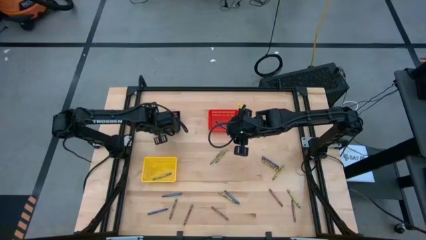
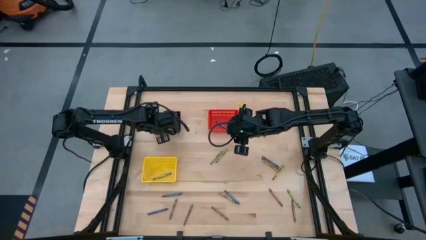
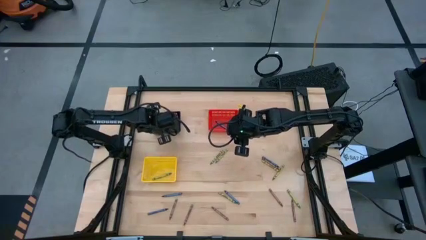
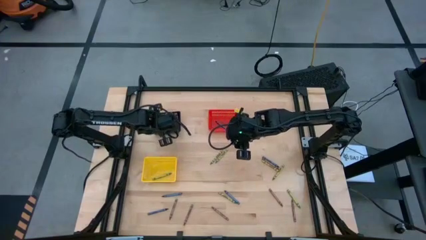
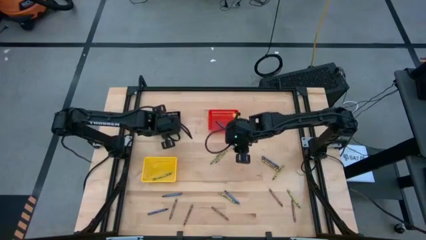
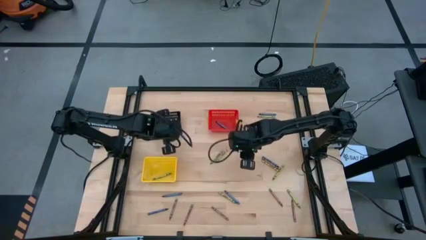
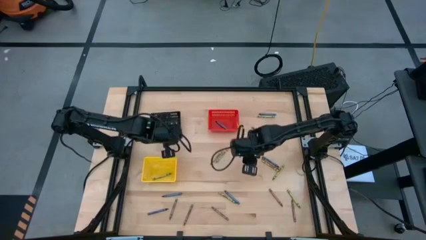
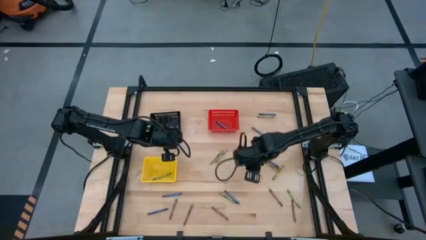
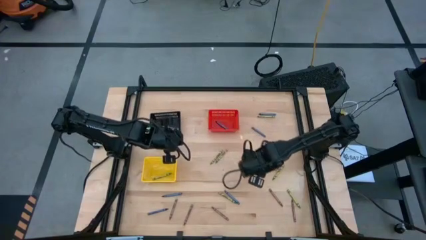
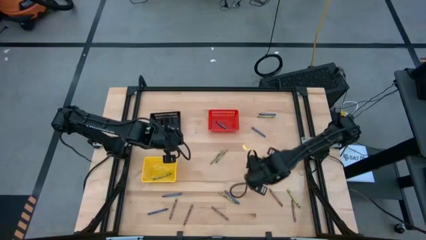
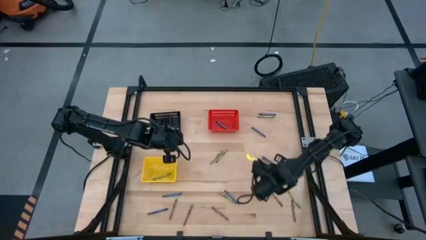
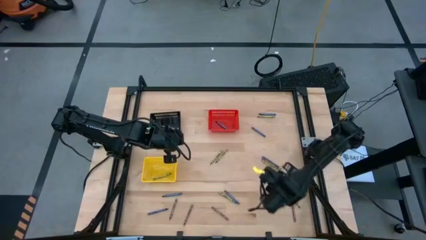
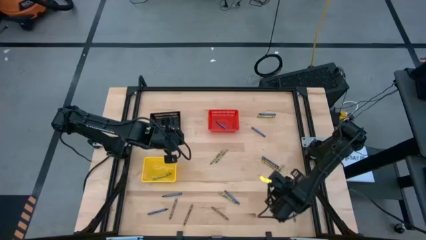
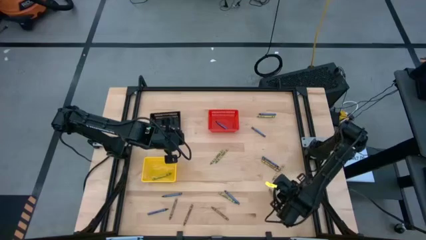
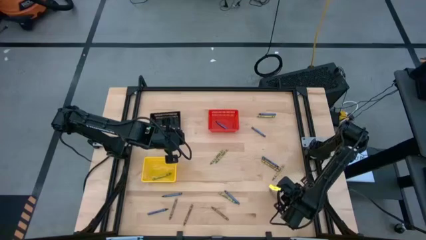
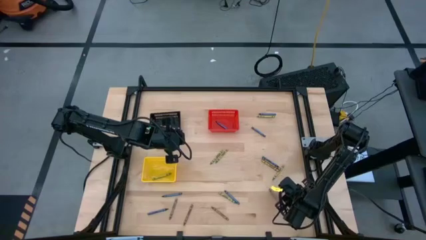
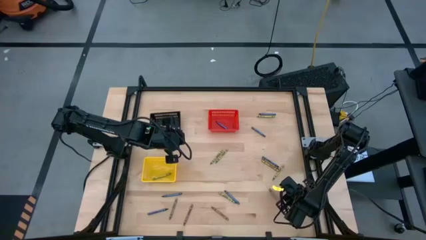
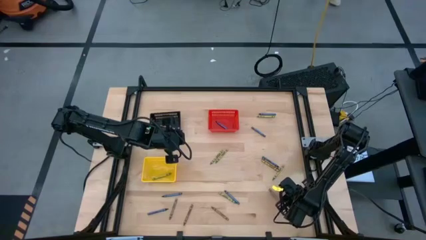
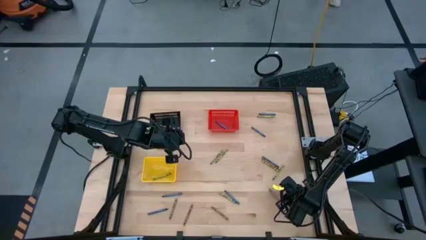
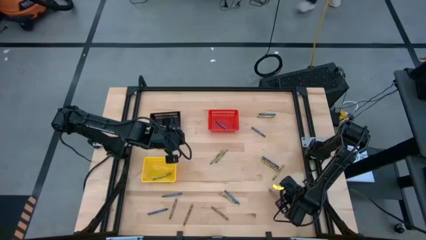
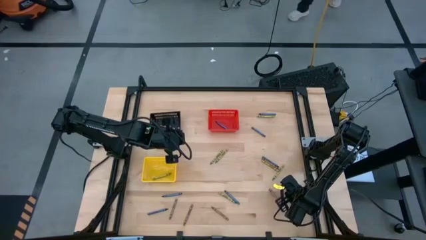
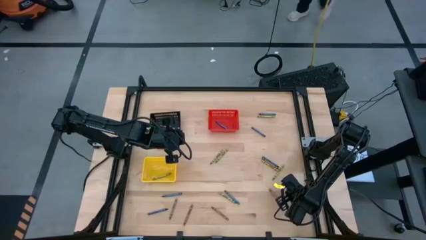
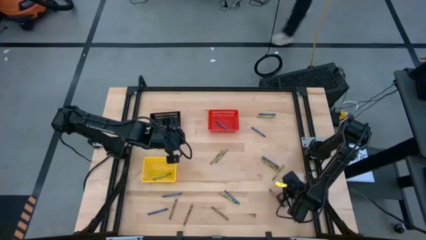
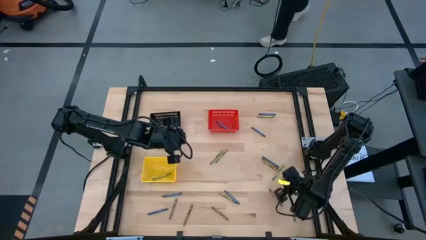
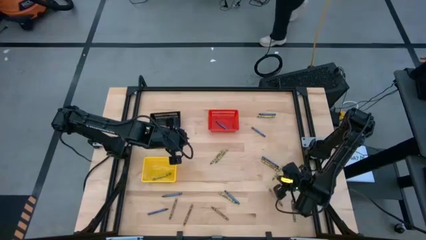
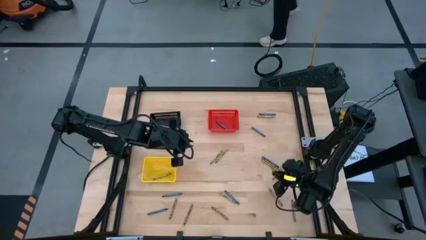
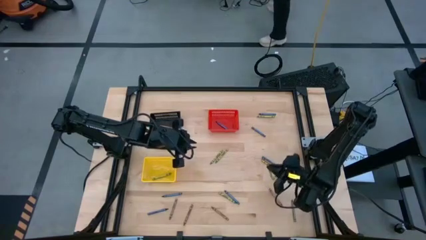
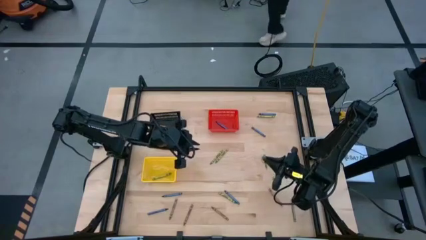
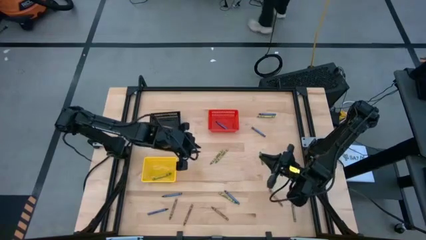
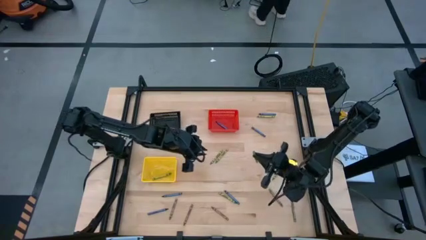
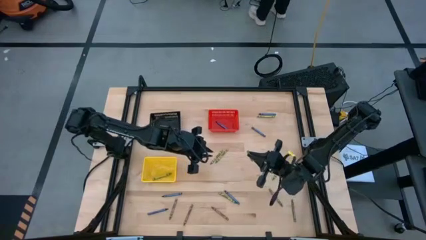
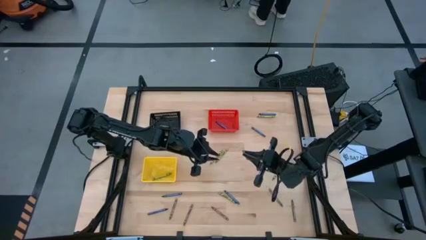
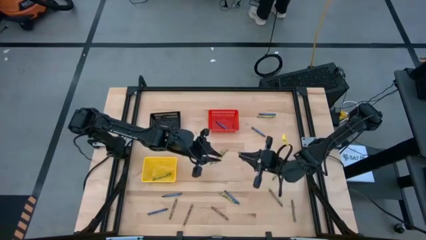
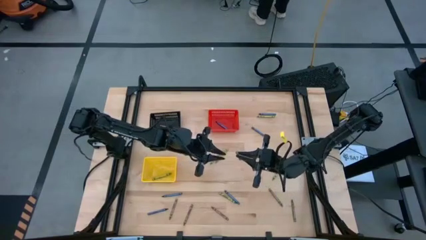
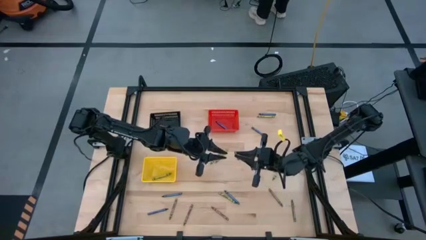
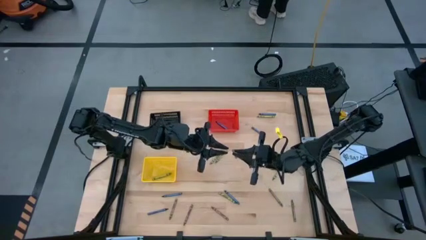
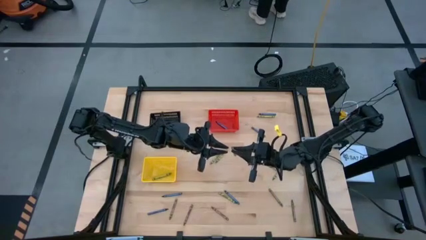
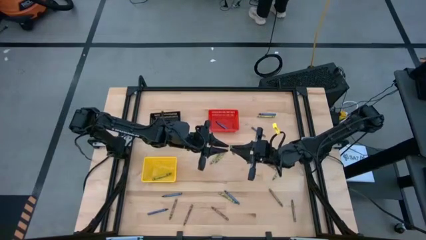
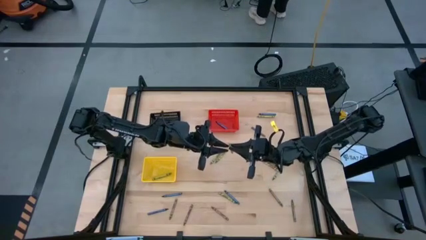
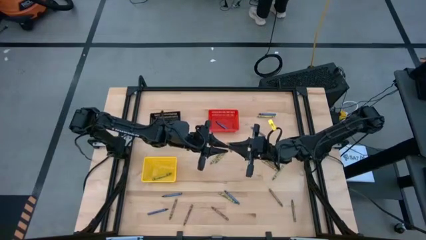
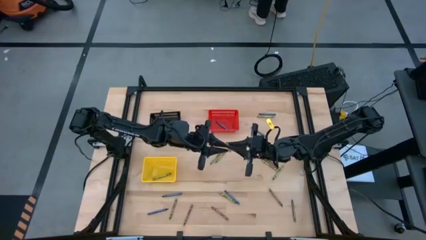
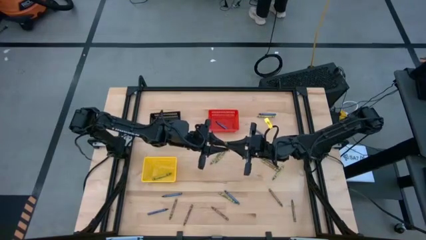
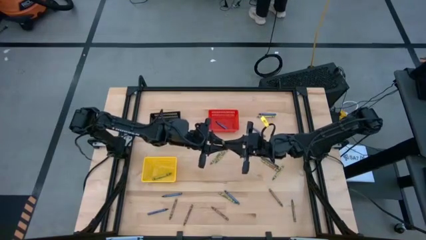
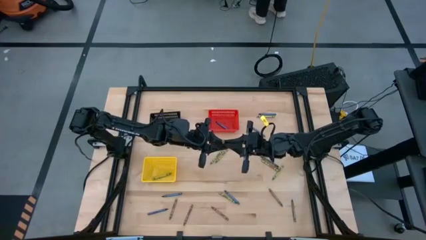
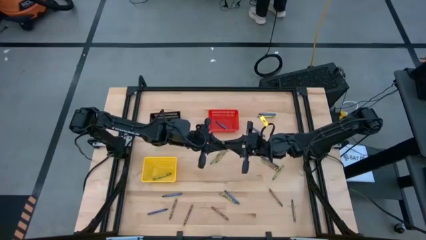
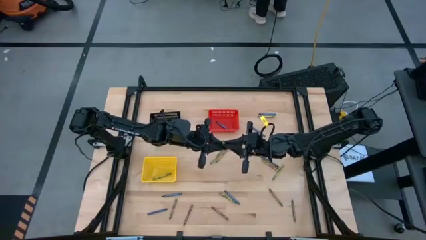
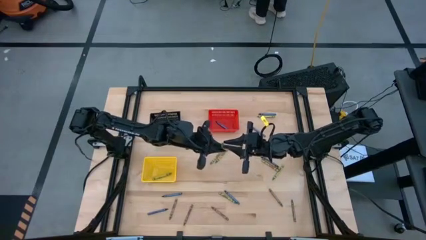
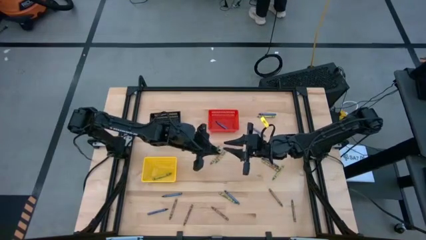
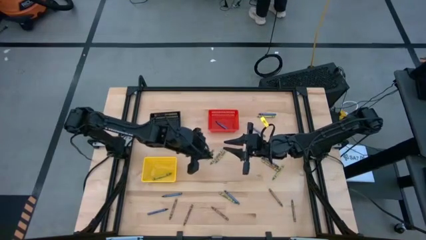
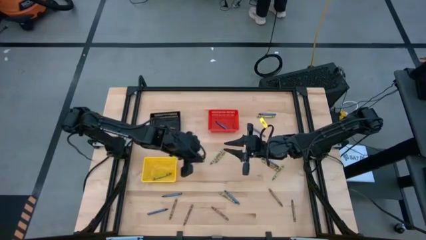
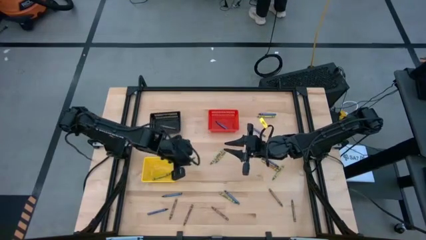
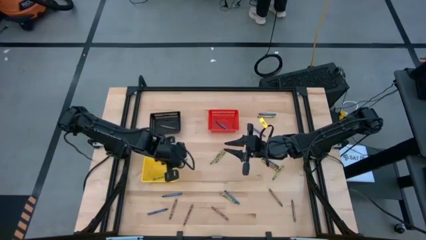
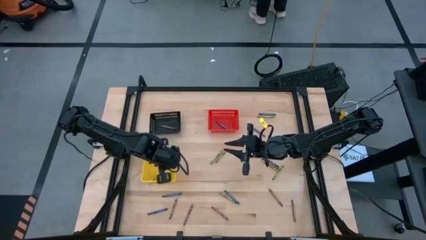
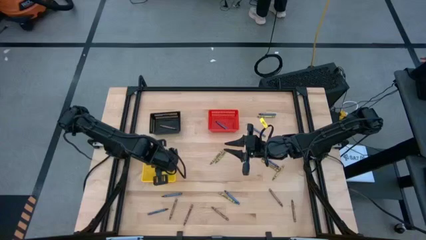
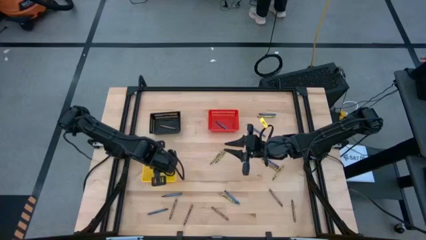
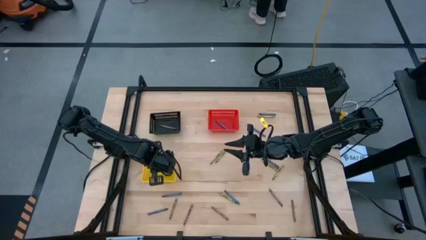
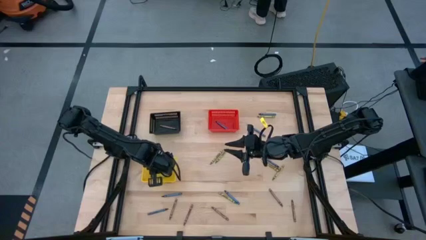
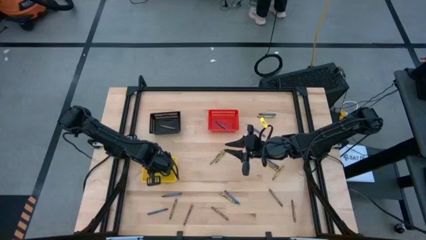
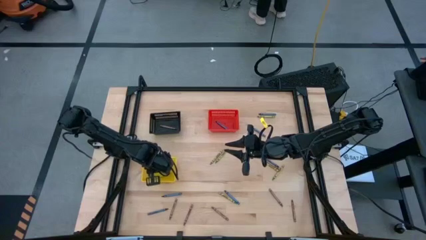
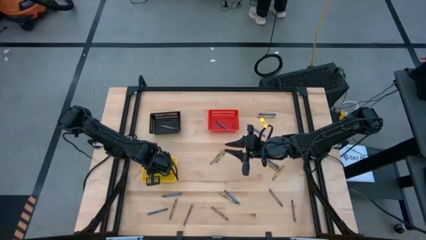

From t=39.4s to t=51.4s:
Task: Sort crayons
Put the green crayon into the yellow bin

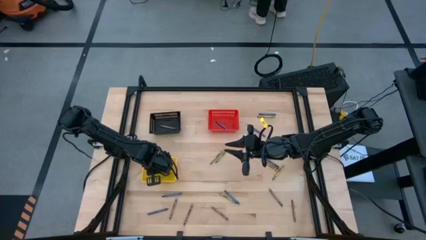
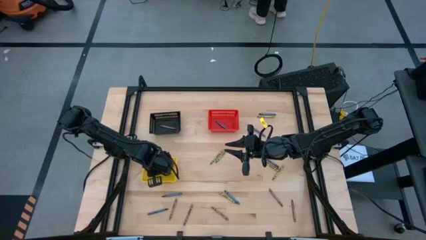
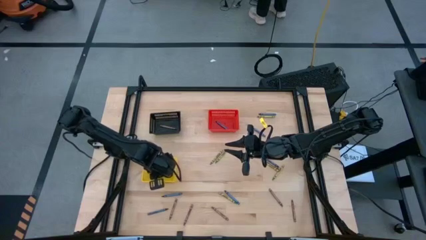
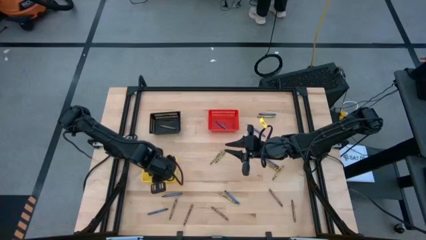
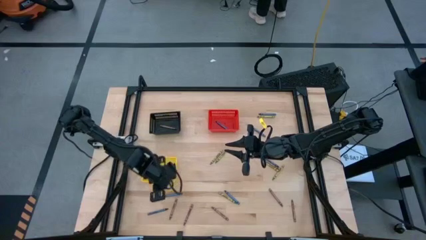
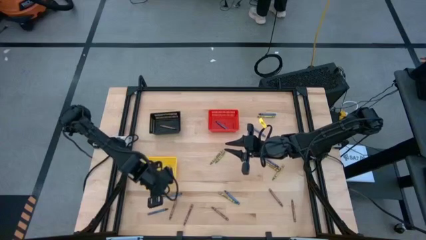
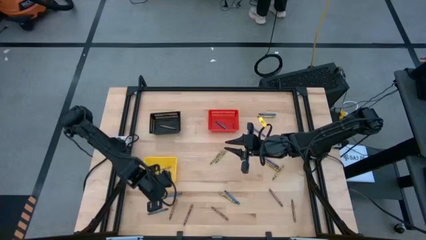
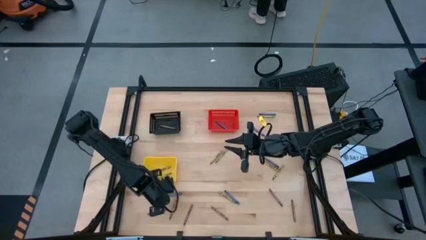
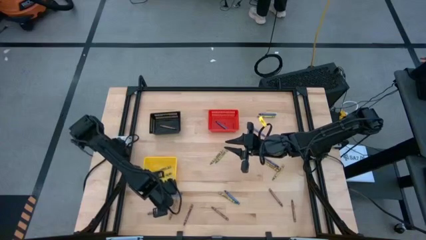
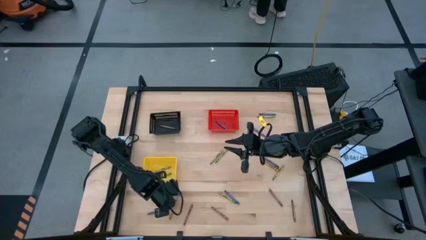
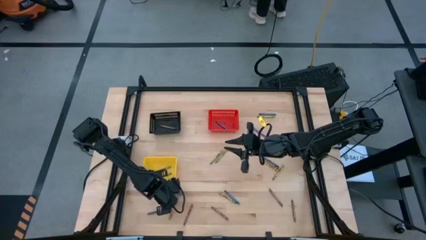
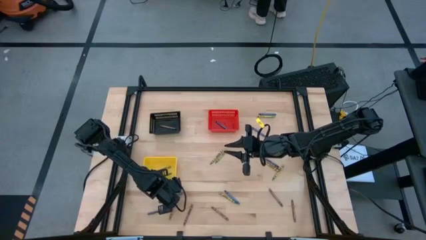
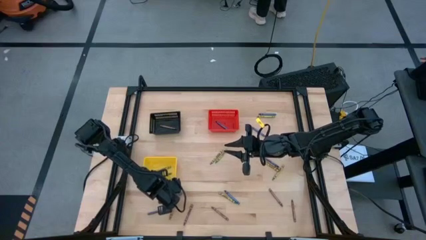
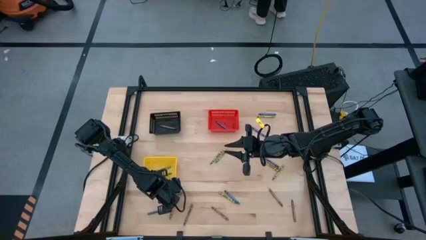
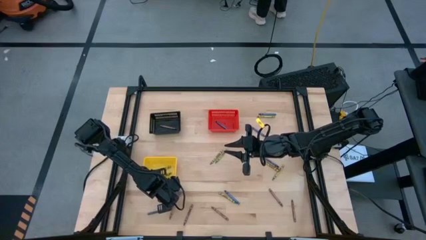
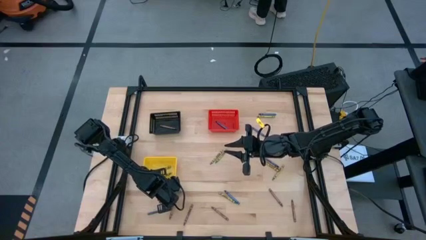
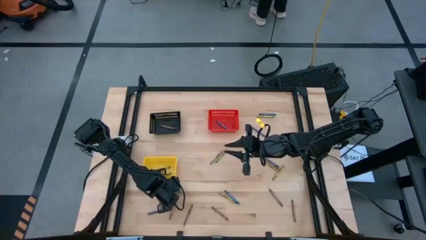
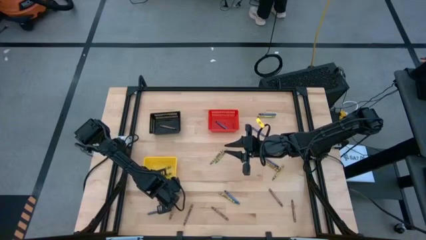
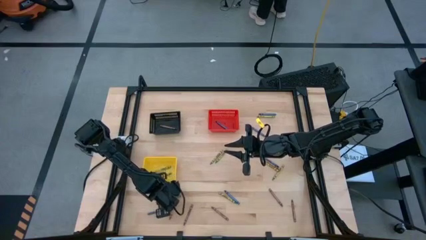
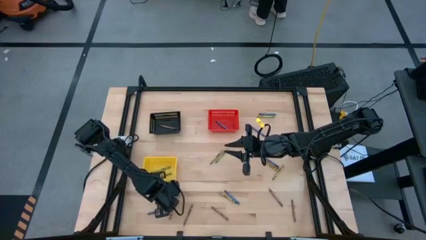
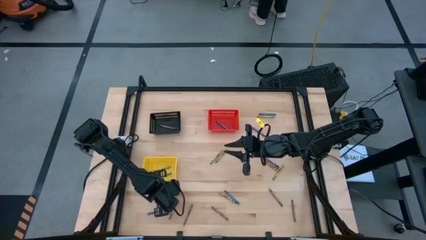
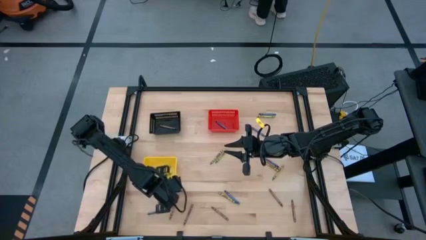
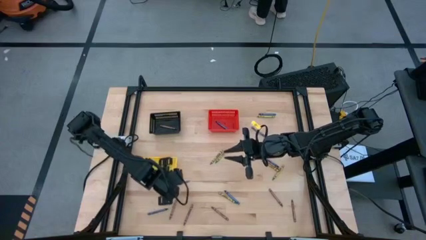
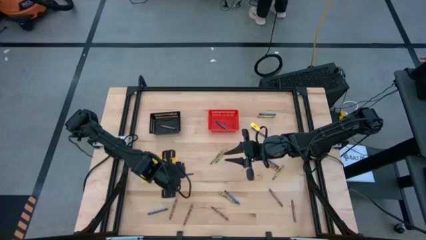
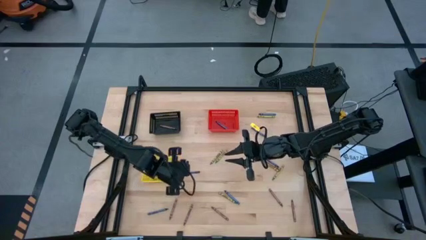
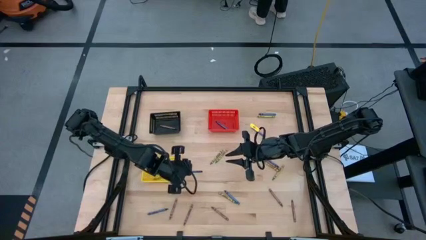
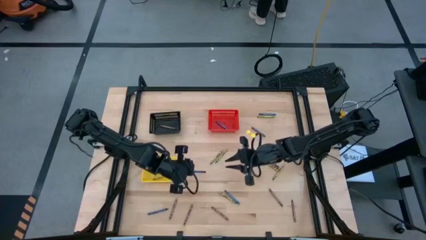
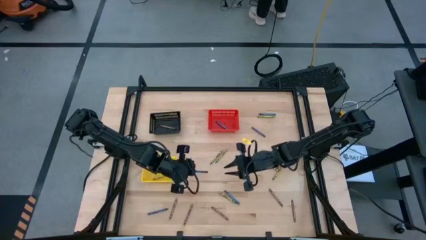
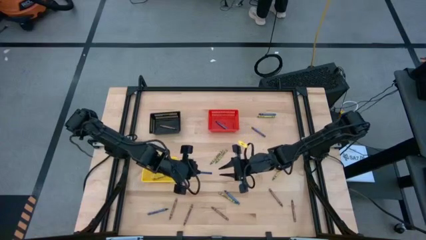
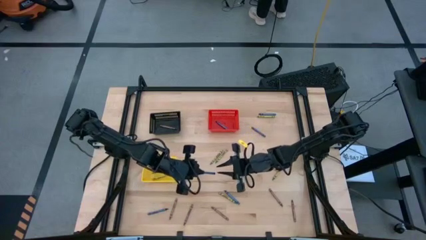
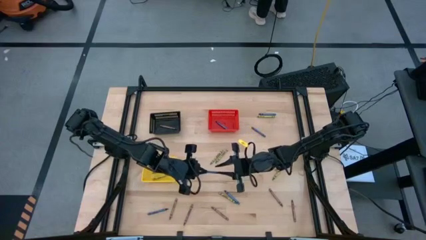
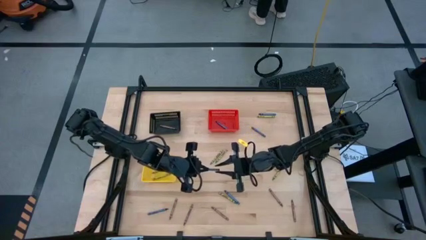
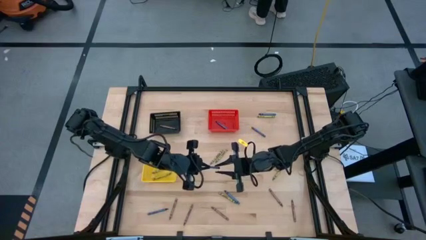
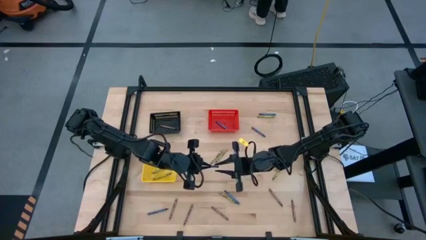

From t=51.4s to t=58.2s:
Put the blue crayon into the red bin
